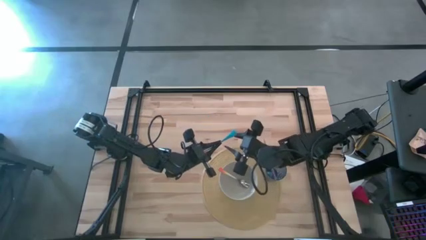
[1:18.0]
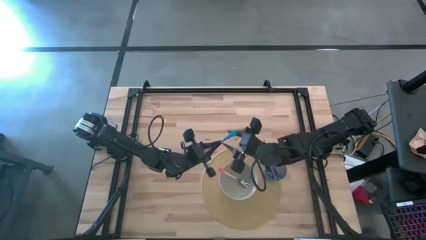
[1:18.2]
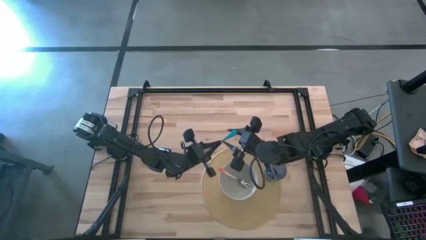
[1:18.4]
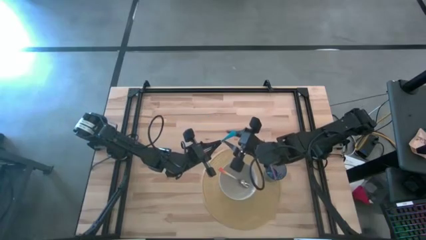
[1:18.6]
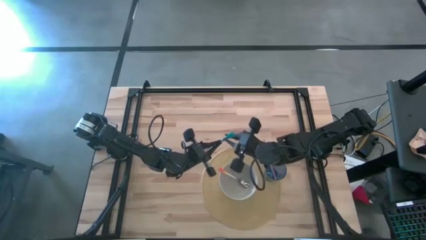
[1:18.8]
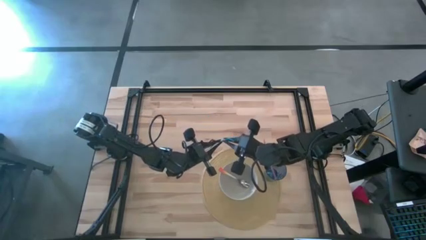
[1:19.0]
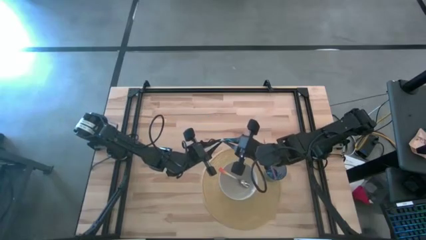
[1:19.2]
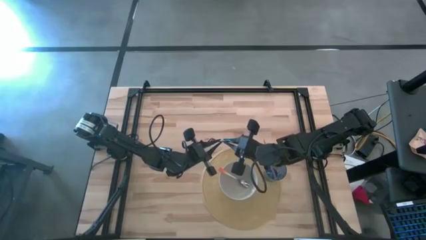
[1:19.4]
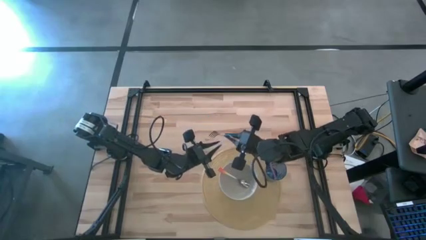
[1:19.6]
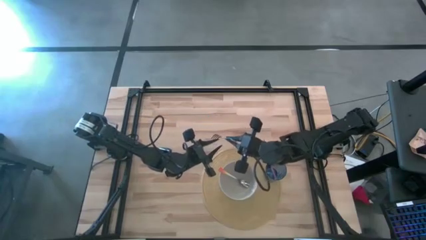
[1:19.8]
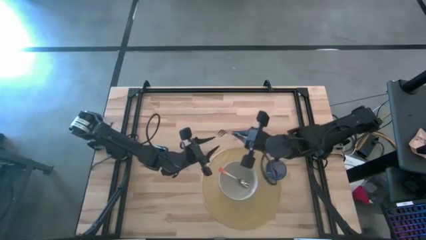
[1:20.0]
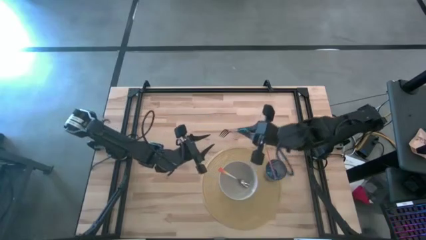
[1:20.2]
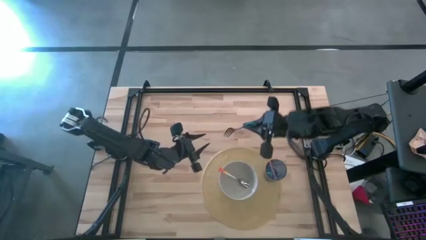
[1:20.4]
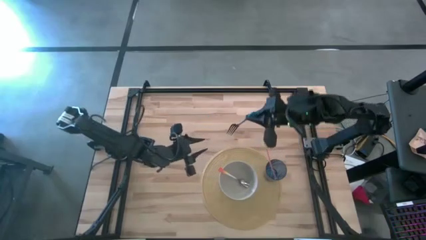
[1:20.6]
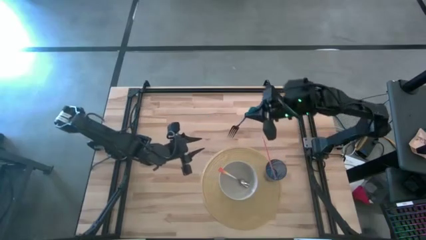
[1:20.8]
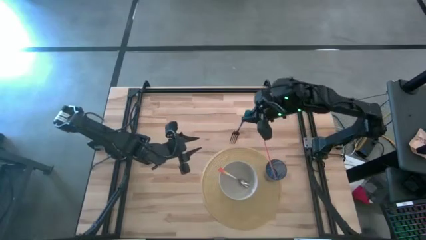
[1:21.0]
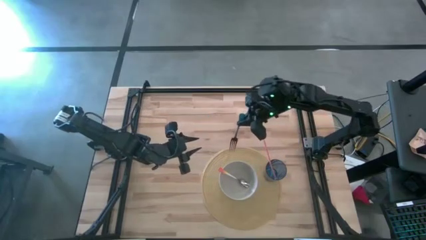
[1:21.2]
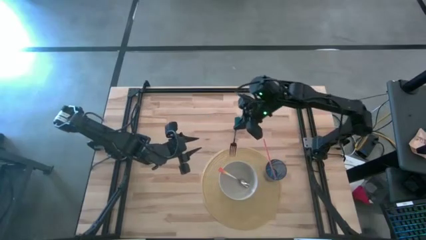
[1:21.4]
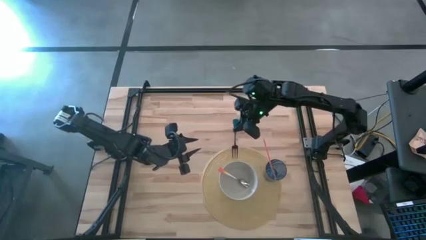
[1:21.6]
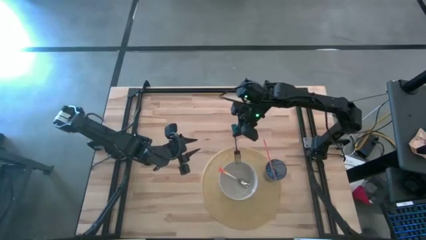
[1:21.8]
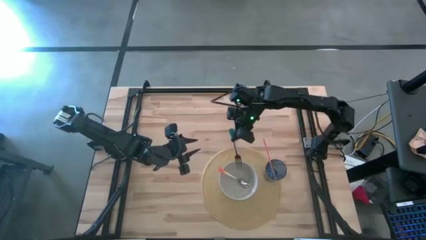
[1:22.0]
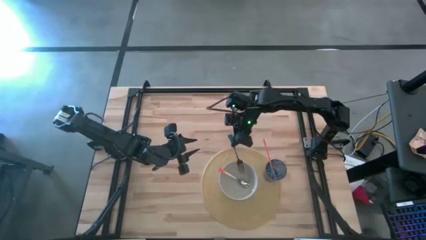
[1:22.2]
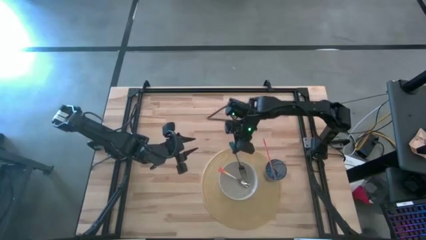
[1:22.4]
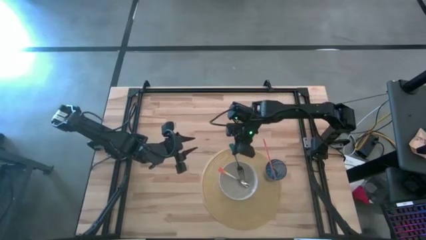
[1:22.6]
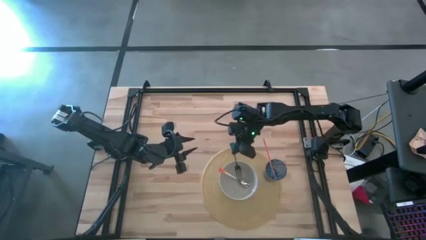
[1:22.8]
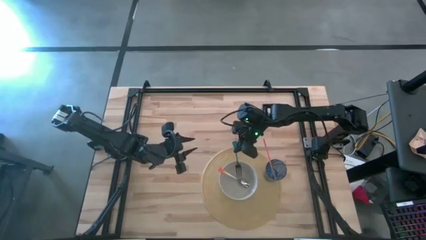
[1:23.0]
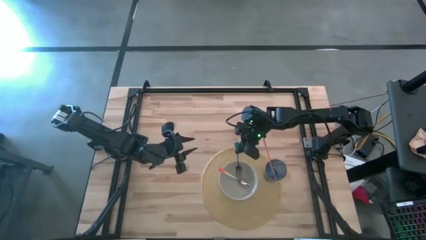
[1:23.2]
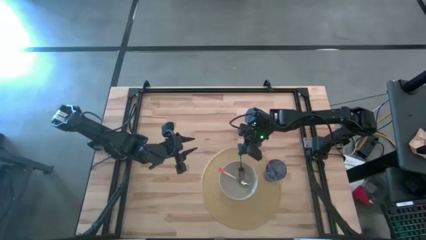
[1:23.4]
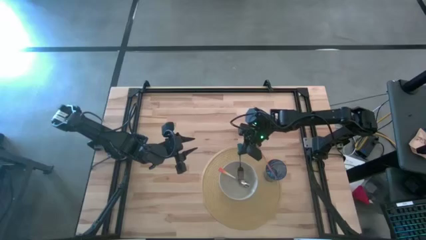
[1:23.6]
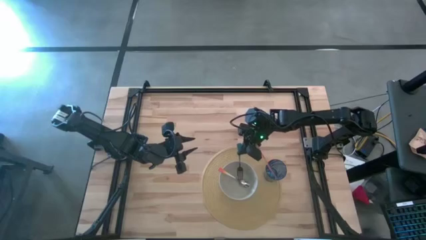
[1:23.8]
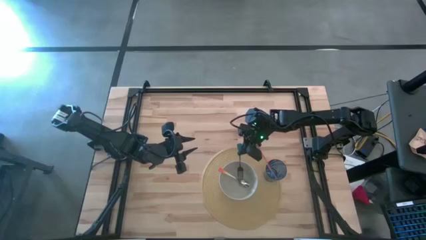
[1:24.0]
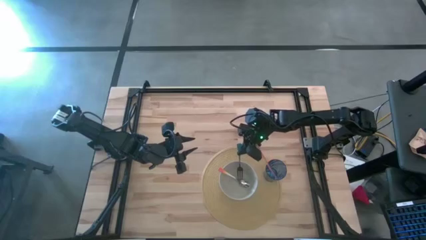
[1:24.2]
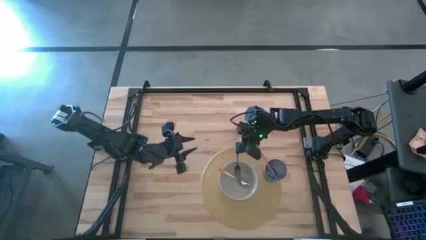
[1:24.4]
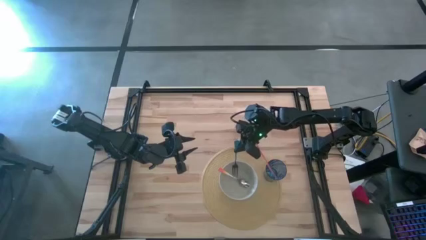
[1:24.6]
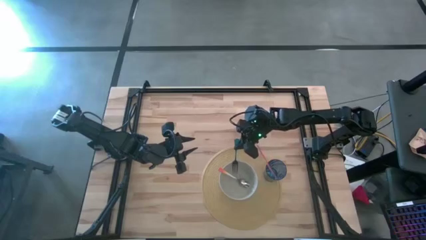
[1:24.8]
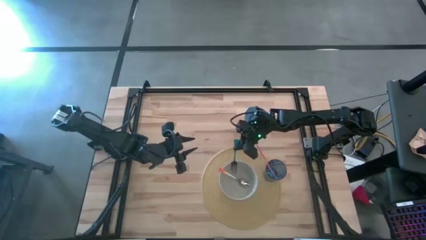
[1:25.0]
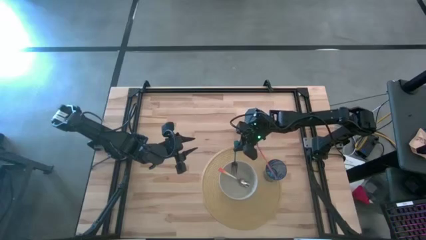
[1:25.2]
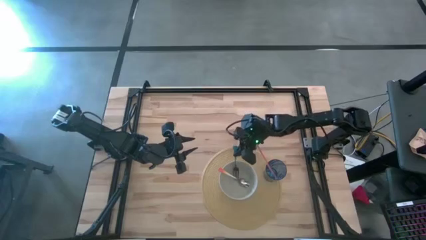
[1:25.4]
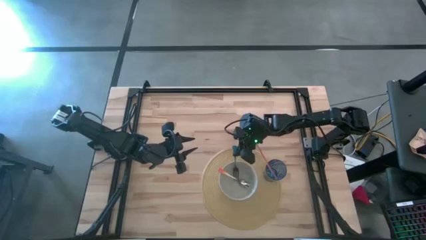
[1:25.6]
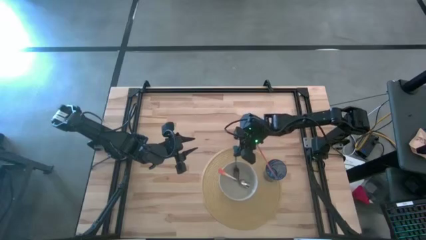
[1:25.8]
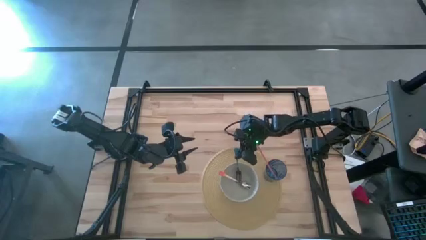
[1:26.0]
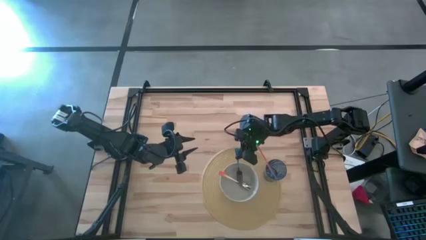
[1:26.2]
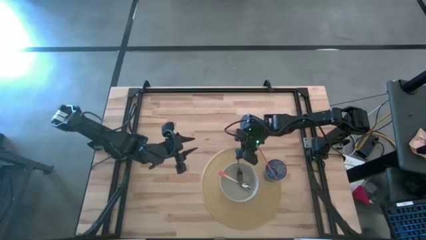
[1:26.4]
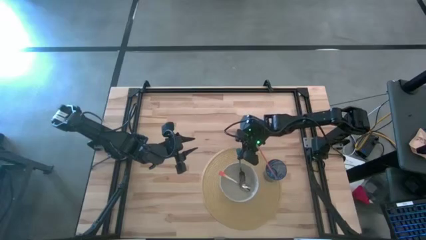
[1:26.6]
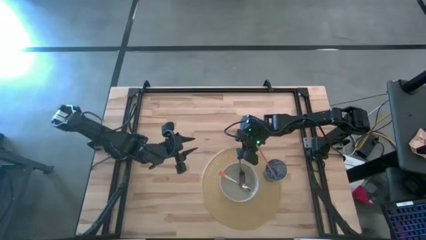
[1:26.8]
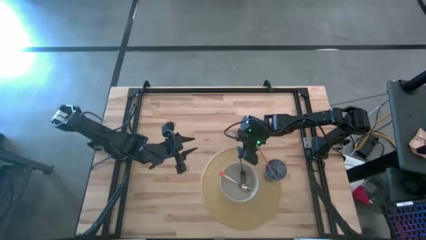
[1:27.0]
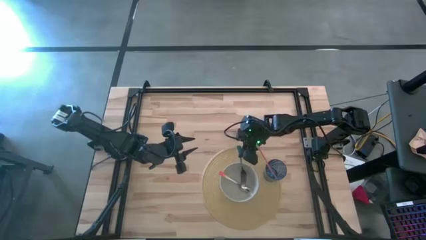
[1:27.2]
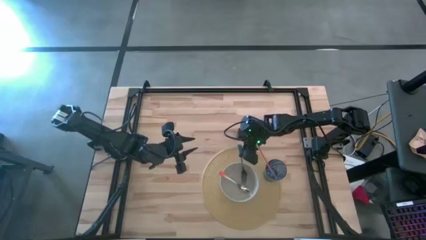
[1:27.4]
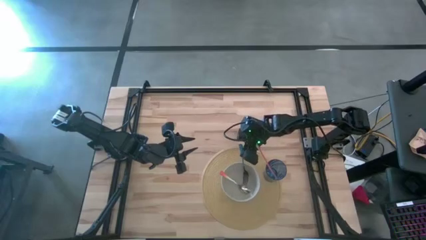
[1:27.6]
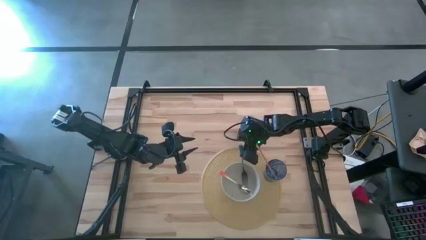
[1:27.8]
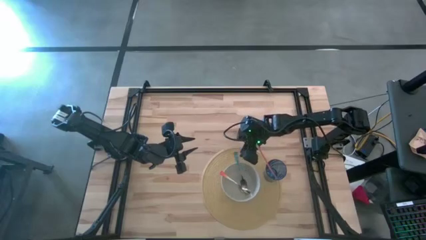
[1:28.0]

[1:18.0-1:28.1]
Task: Pick & Place Utensil
Put the blue fork into the gray bowl

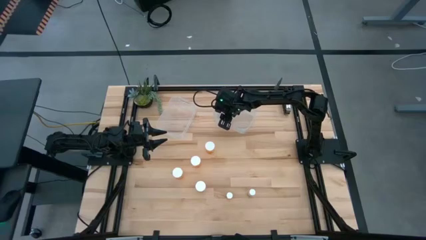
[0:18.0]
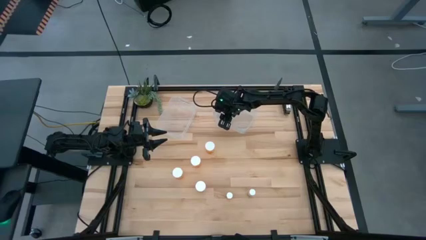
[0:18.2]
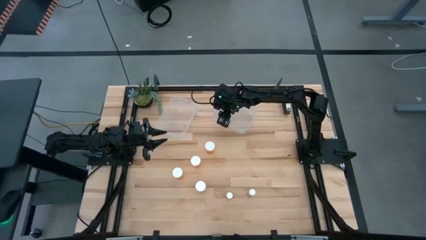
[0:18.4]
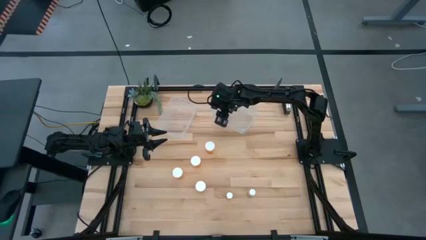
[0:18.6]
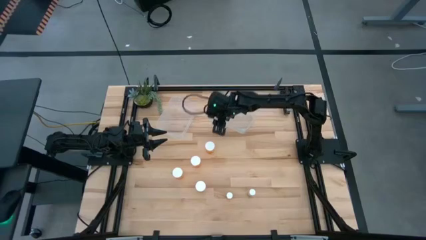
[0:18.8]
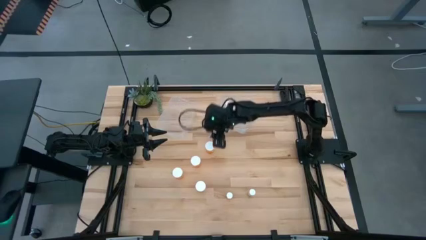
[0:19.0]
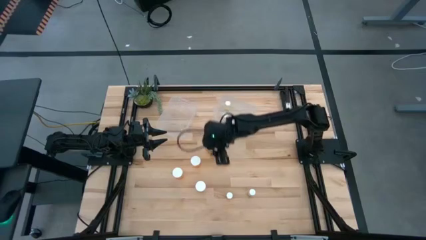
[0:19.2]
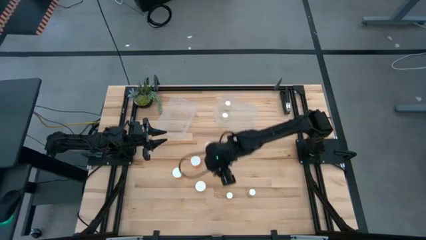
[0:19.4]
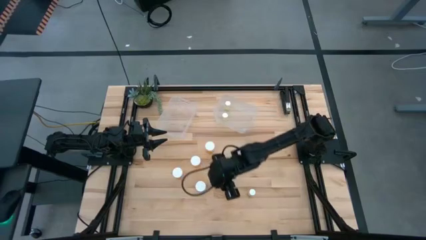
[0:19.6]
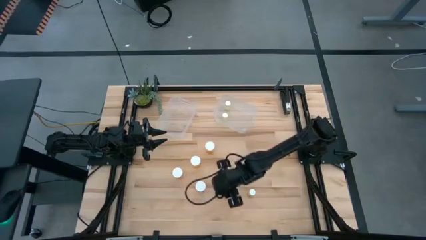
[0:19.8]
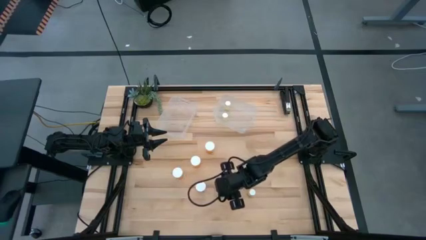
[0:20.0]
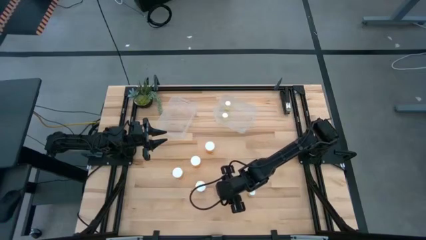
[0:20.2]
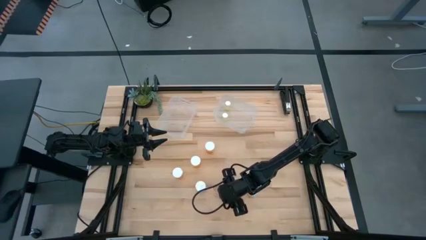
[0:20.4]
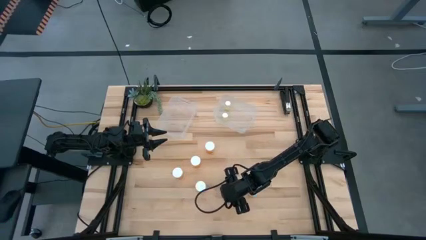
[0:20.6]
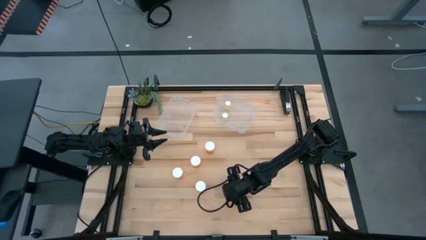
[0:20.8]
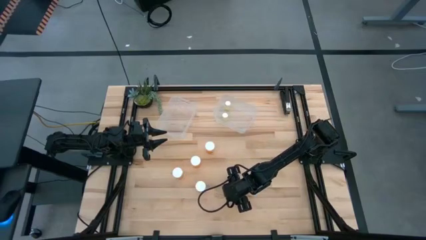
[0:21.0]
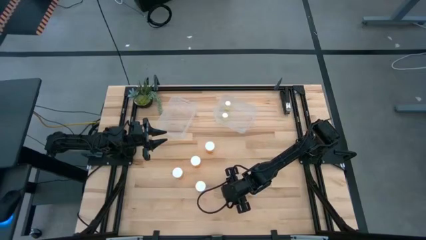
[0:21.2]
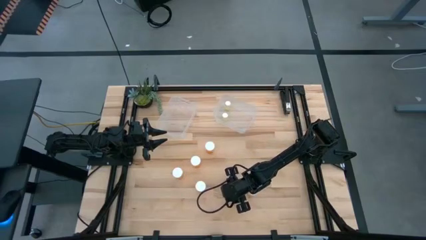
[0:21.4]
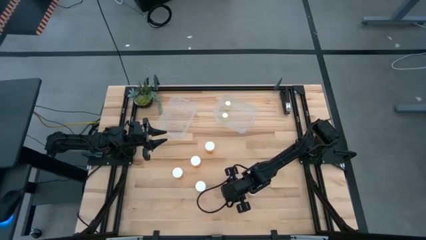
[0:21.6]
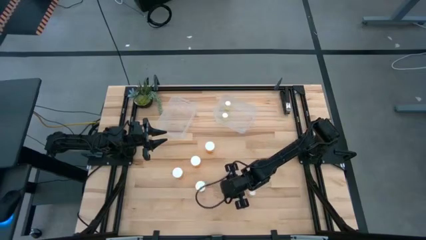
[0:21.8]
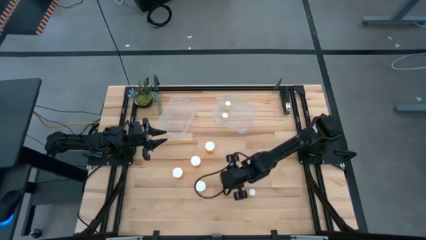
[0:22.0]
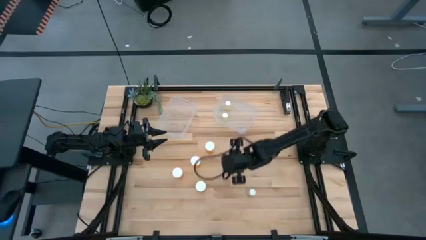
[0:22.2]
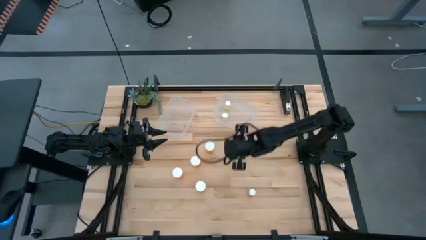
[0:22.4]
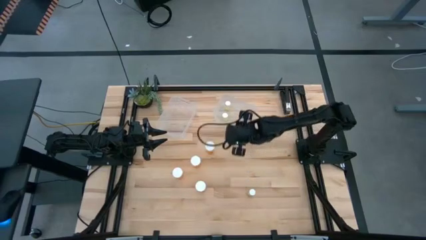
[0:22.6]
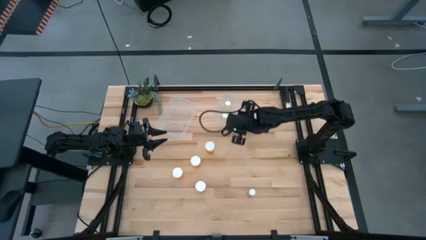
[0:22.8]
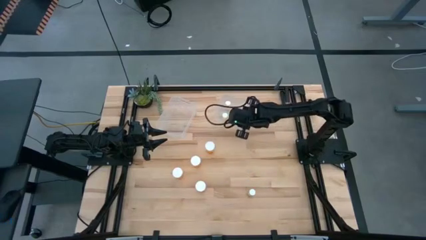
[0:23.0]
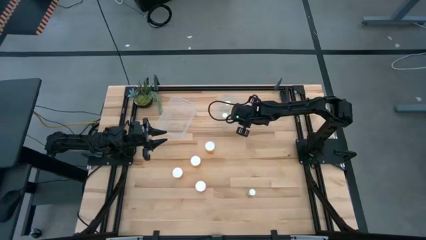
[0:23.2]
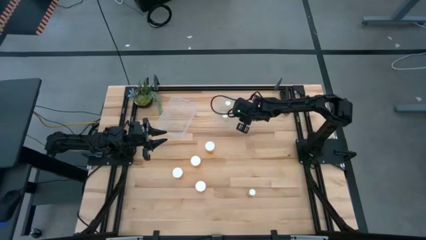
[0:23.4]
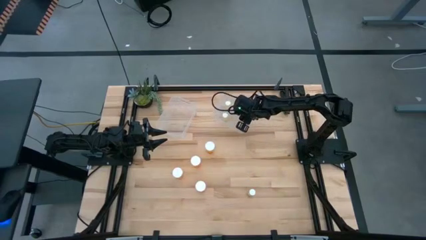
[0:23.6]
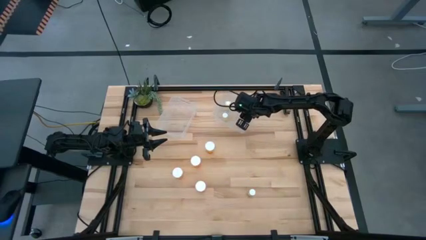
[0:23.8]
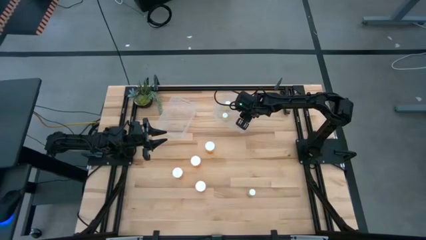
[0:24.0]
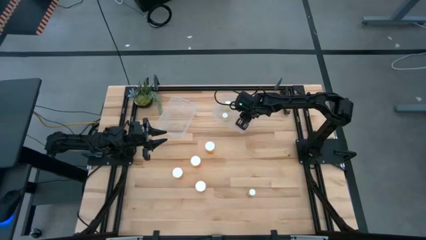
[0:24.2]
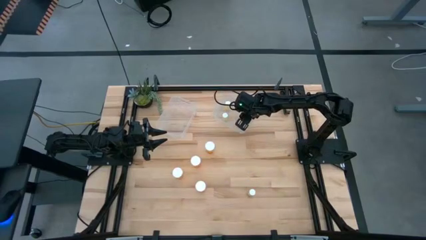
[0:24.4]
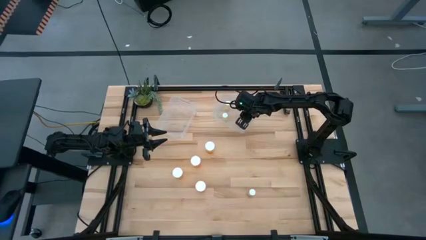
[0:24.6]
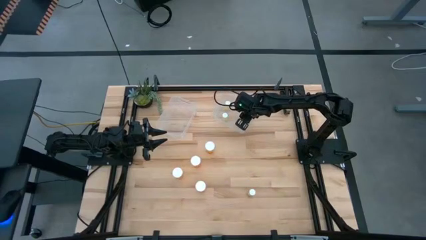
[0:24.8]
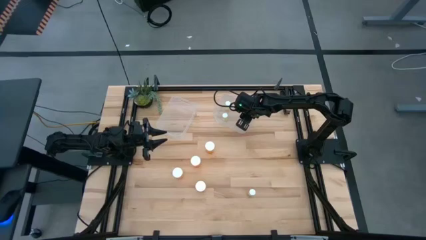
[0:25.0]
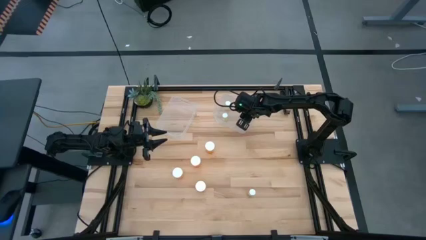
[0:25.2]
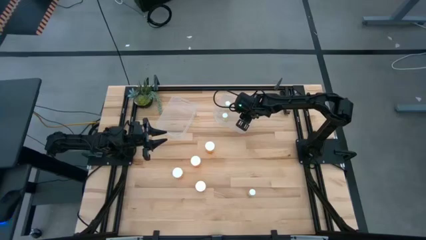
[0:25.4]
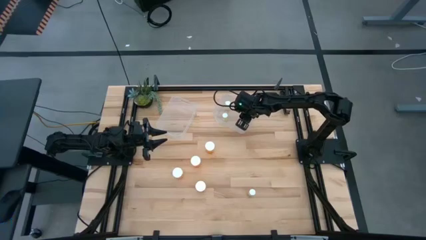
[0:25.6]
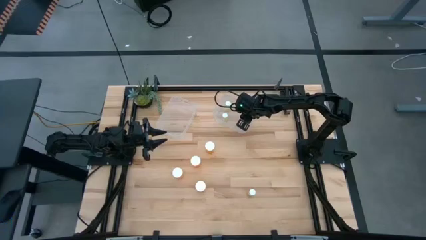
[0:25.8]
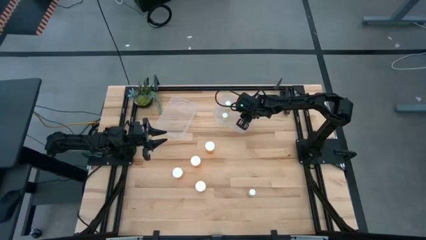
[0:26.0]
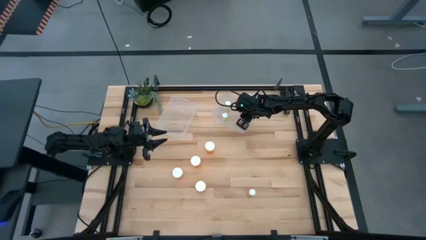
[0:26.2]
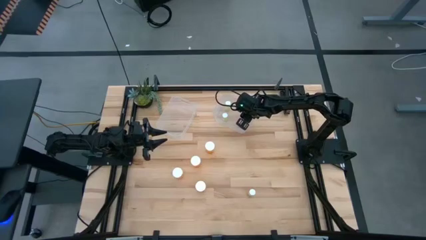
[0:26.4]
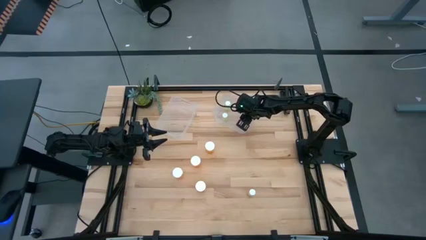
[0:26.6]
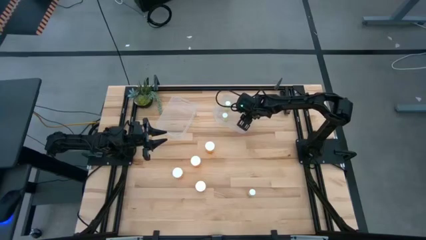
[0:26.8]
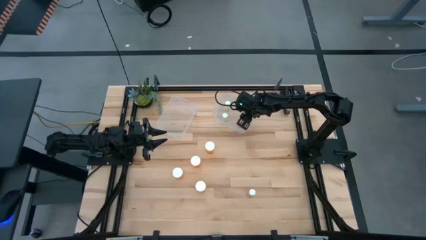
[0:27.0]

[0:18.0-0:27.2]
Task: Pick and place medicine bottles into bin by pill shape (circle, oval)
Put the small orange pill bottle into the right transparent bin
